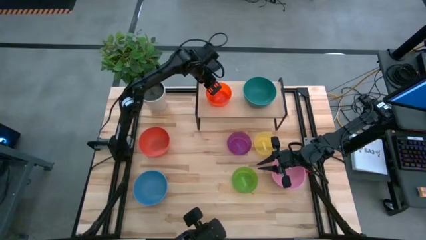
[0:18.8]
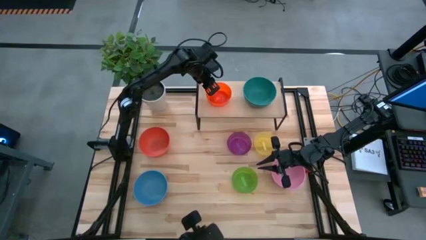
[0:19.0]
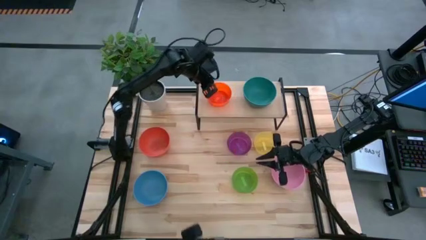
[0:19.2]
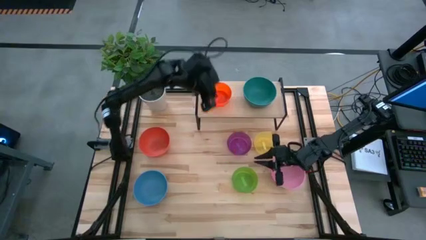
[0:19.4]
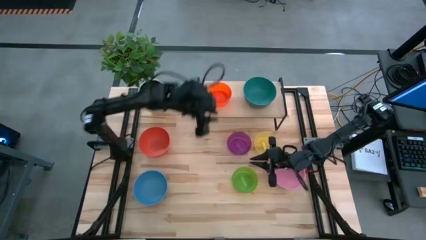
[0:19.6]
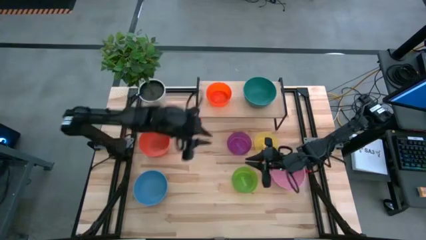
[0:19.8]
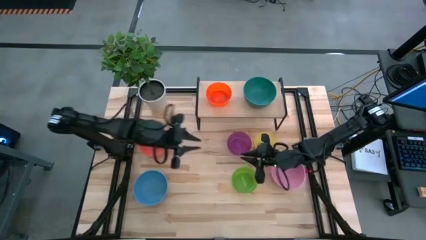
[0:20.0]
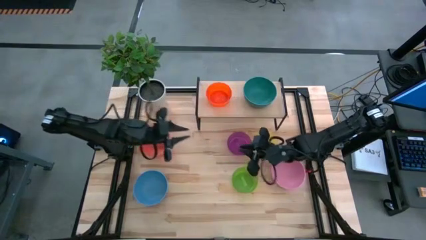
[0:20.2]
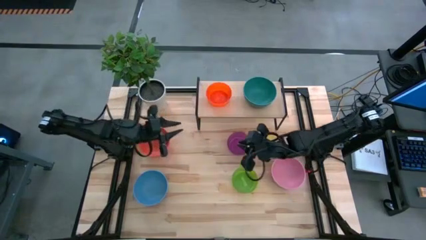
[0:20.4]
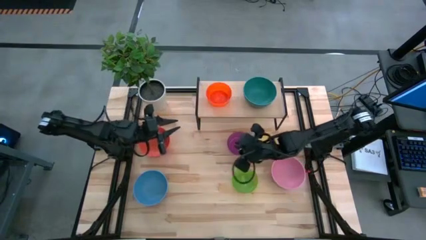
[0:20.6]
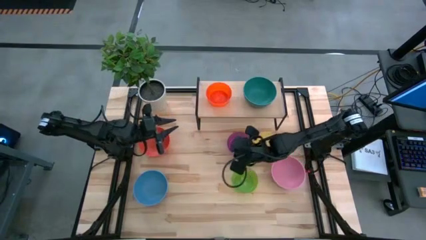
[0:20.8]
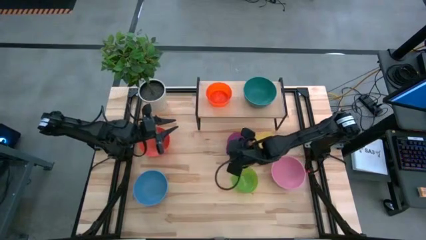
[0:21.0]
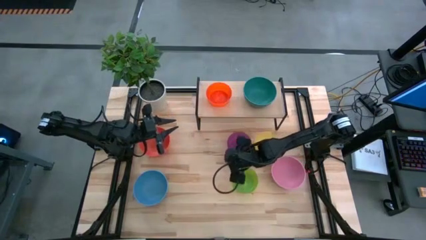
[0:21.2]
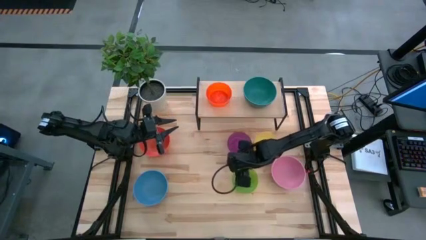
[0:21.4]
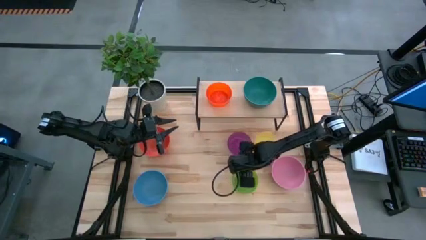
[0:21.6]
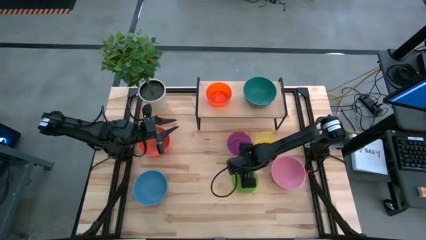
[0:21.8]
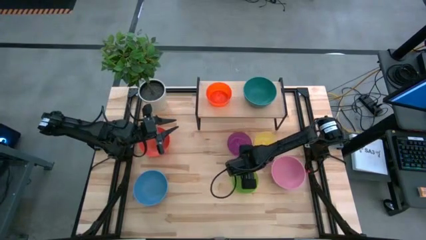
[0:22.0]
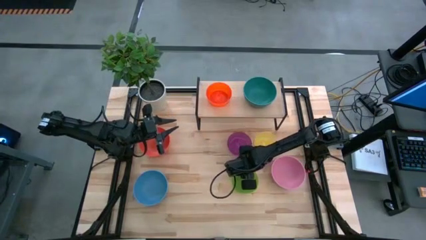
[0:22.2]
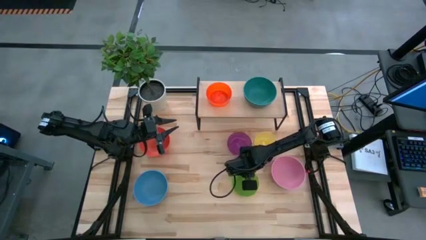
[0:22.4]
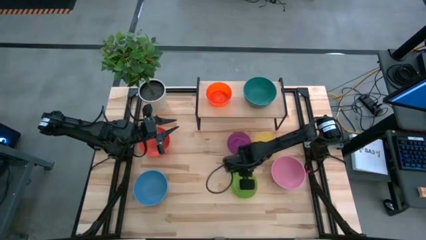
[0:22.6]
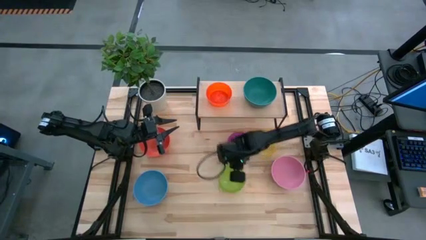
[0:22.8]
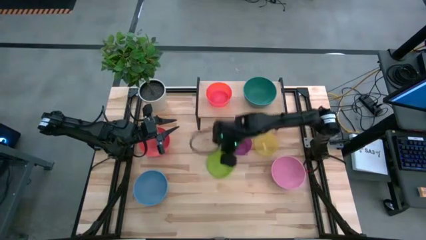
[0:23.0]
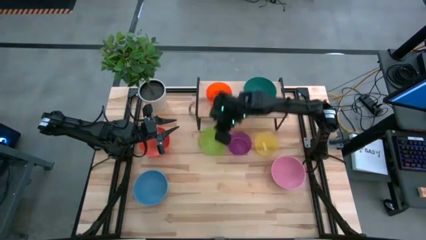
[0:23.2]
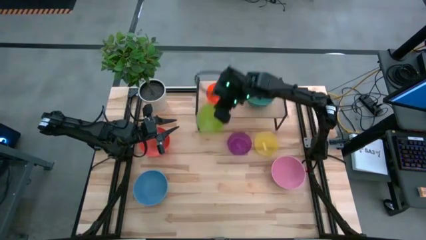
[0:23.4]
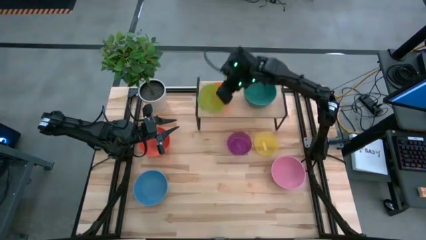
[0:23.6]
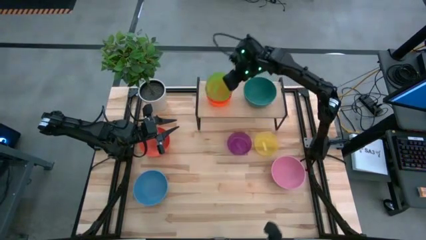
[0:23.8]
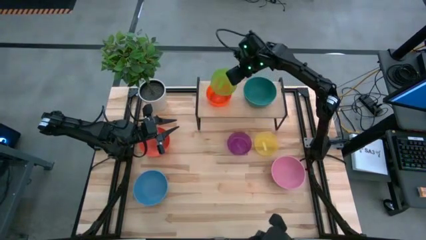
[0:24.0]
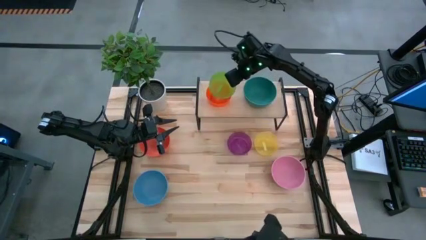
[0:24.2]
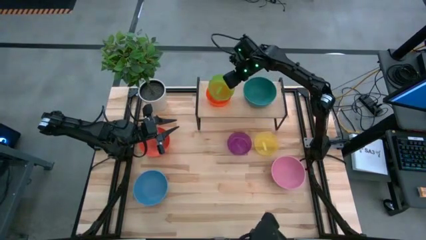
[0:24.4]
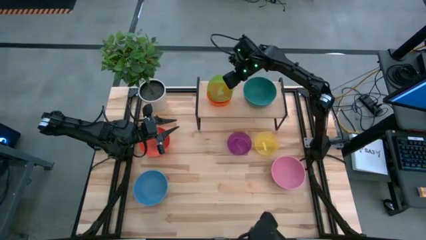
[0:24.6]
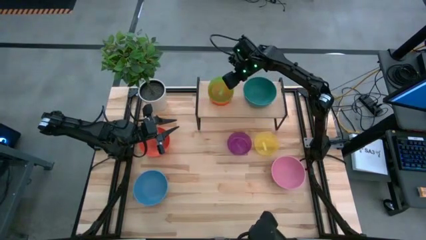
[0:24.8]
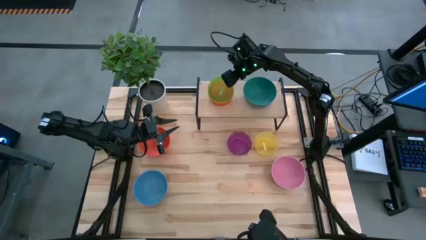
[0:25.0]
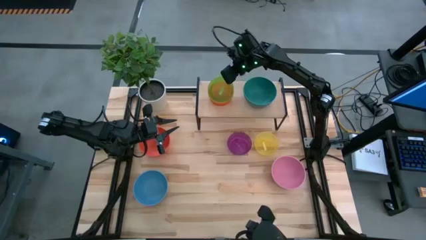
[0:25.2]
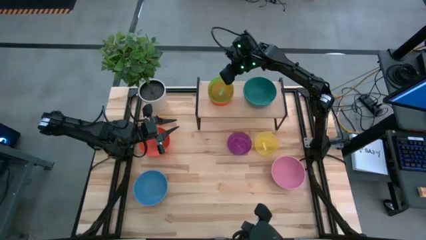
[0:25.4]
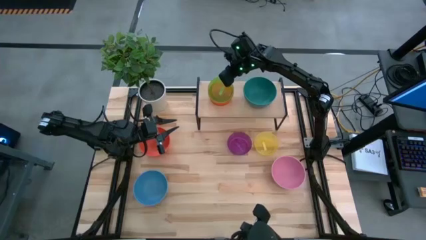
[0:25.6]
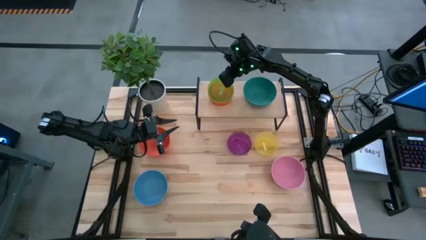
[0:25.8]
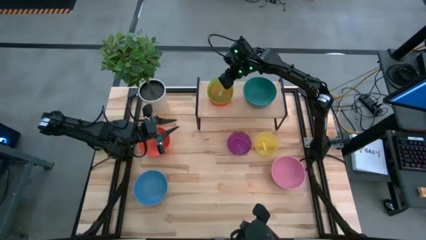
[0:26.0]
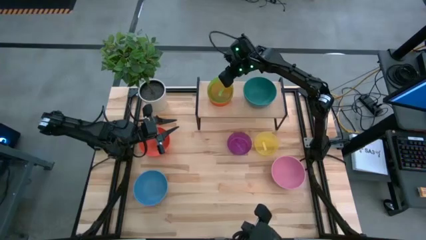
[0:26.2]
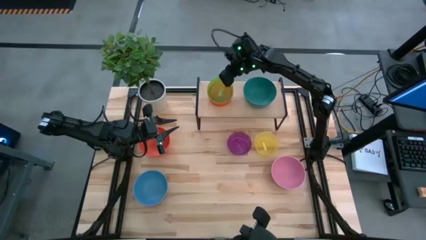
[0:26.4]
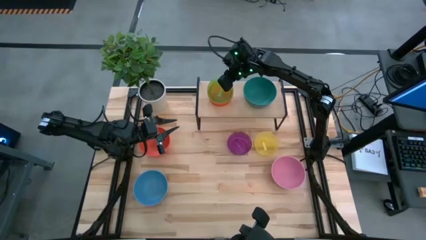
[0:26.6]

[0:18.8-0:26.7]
Task: Place and stack bowls onto a shelf
Stack the small green bowl on top of the small orange bowl on the shelf

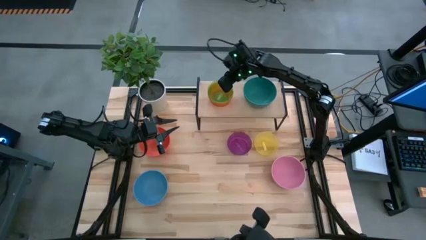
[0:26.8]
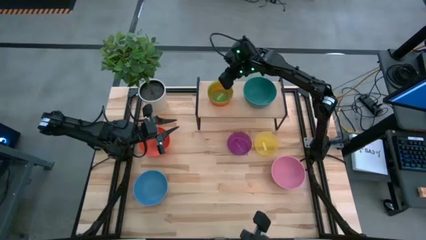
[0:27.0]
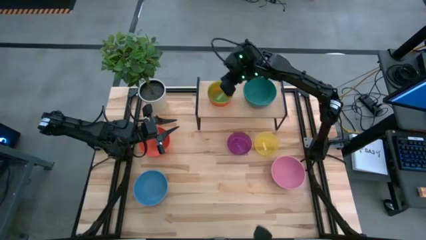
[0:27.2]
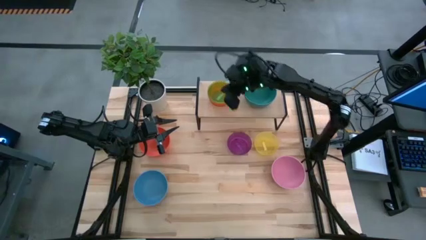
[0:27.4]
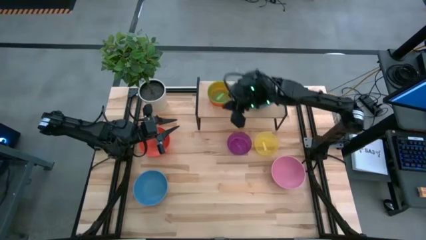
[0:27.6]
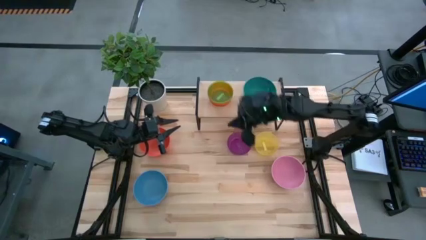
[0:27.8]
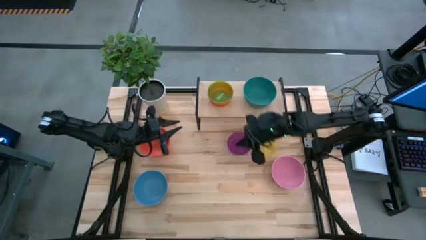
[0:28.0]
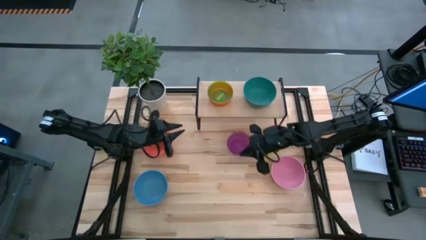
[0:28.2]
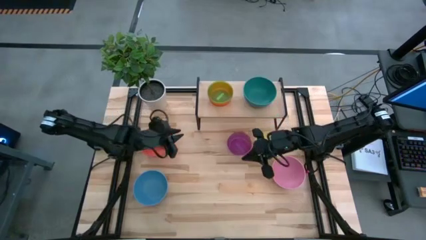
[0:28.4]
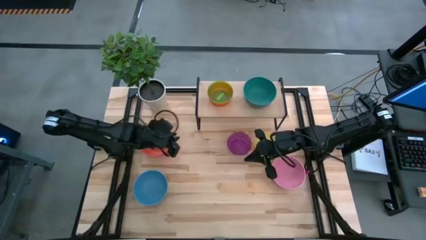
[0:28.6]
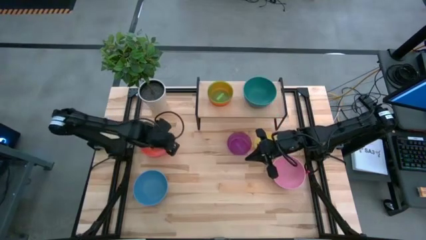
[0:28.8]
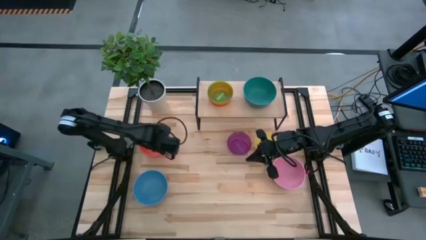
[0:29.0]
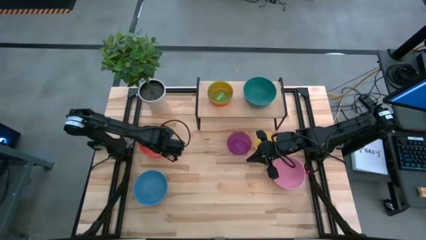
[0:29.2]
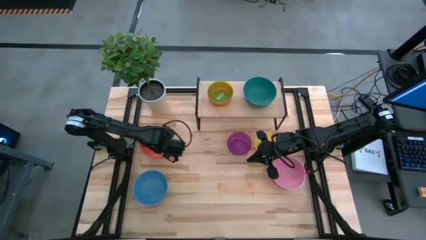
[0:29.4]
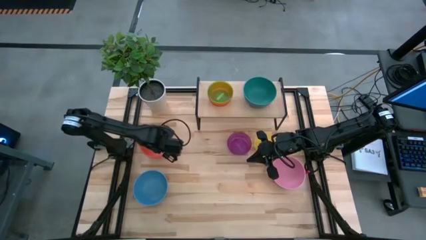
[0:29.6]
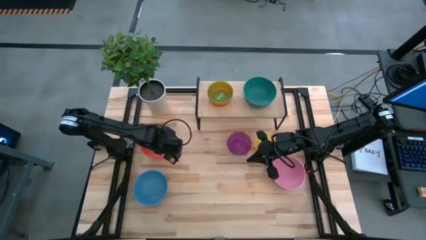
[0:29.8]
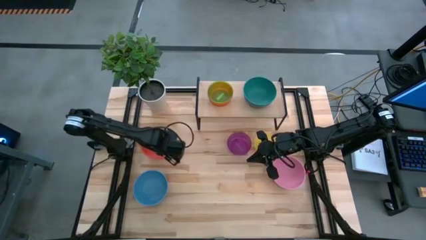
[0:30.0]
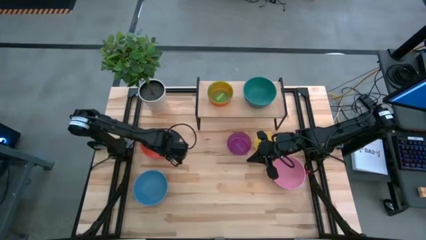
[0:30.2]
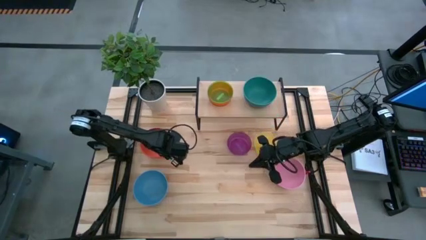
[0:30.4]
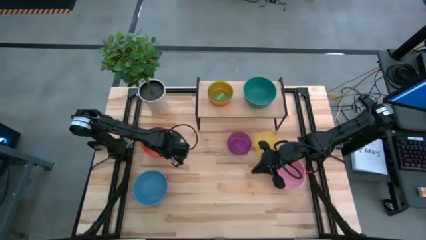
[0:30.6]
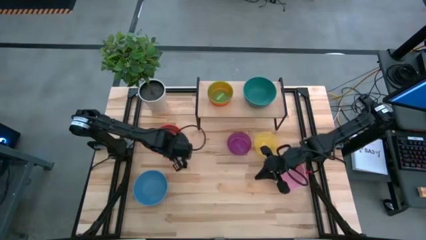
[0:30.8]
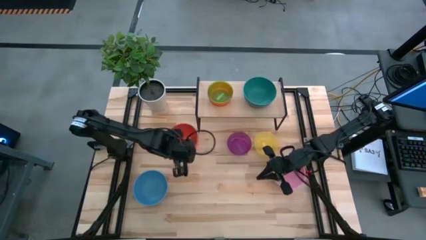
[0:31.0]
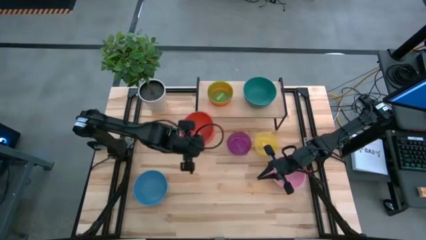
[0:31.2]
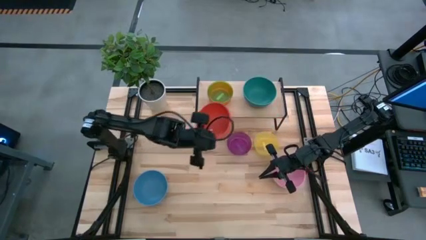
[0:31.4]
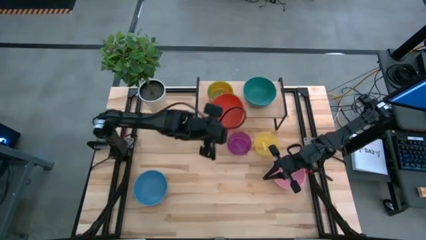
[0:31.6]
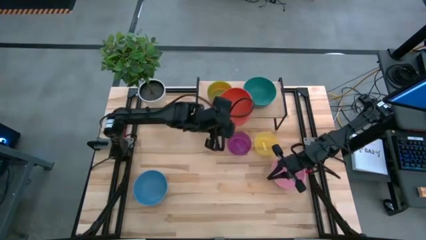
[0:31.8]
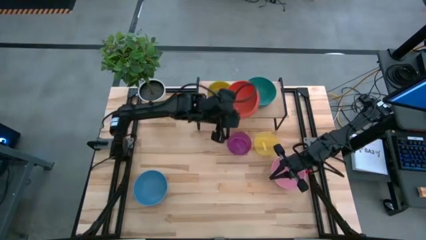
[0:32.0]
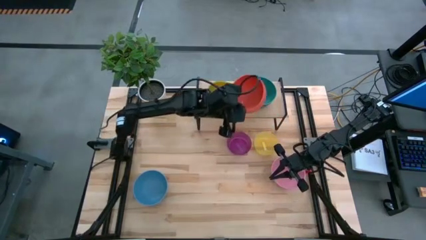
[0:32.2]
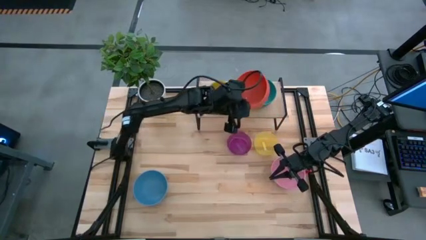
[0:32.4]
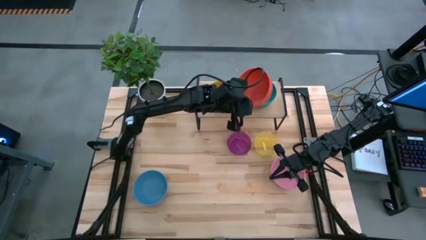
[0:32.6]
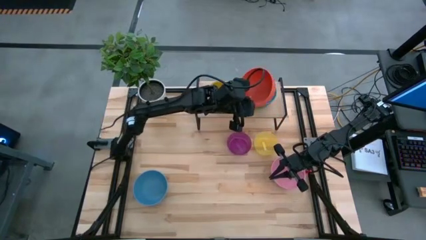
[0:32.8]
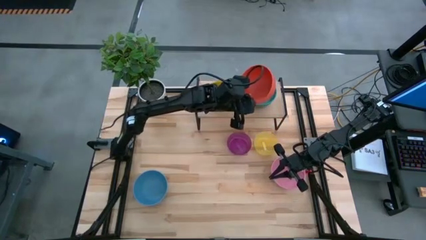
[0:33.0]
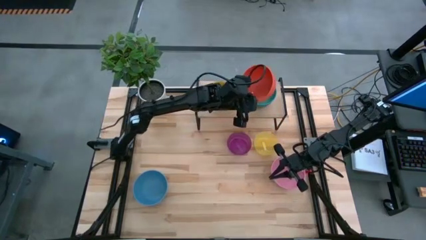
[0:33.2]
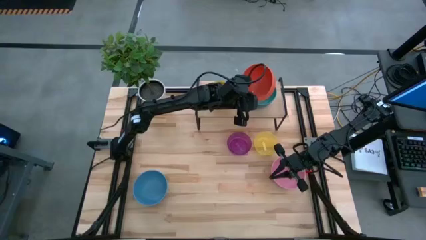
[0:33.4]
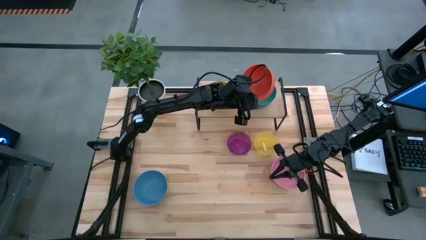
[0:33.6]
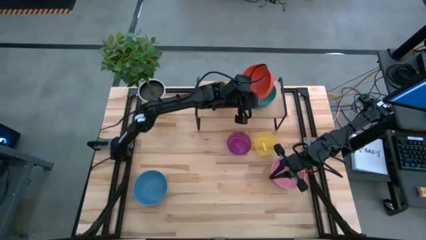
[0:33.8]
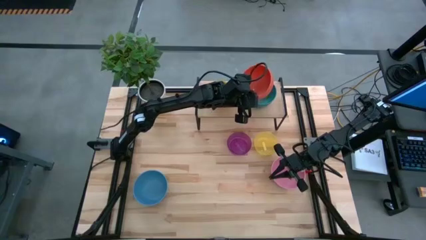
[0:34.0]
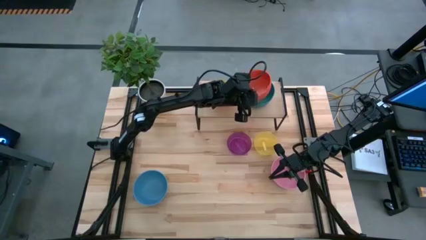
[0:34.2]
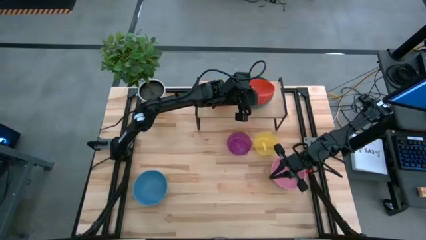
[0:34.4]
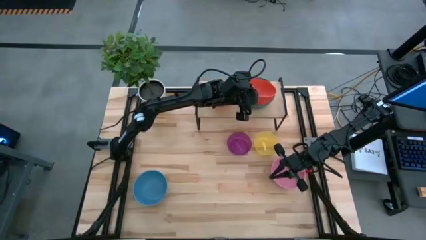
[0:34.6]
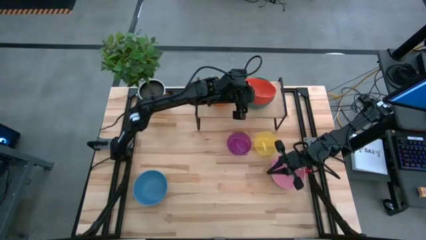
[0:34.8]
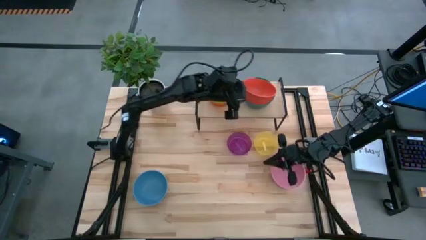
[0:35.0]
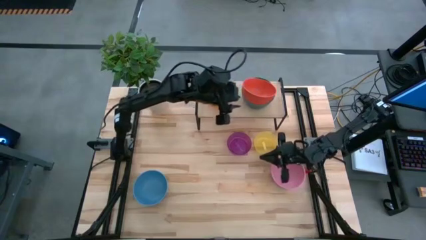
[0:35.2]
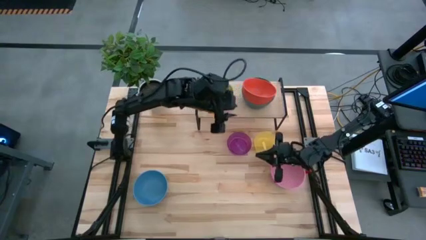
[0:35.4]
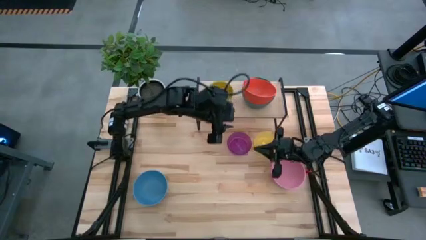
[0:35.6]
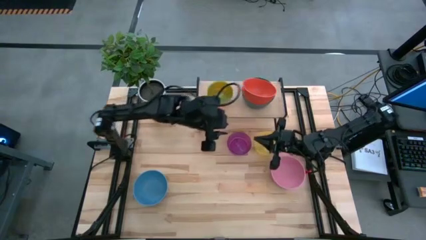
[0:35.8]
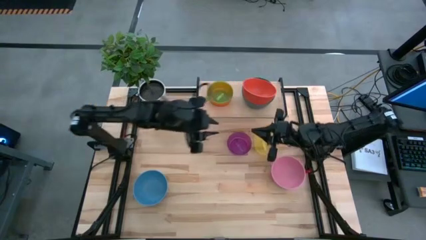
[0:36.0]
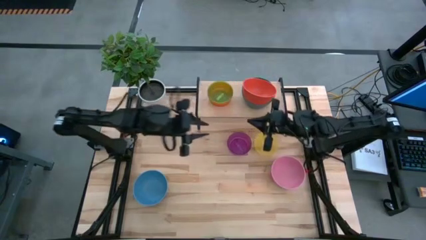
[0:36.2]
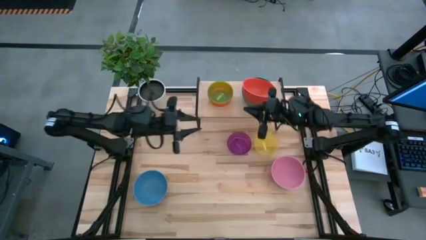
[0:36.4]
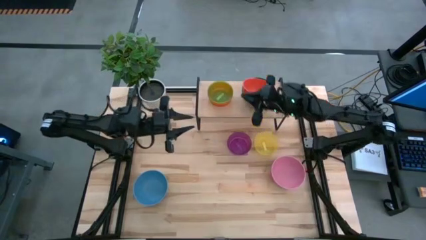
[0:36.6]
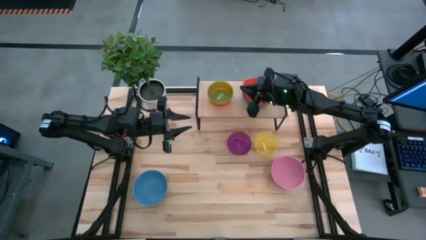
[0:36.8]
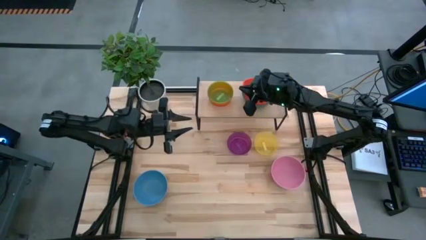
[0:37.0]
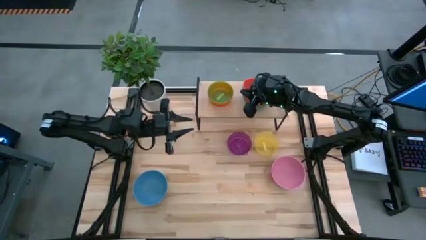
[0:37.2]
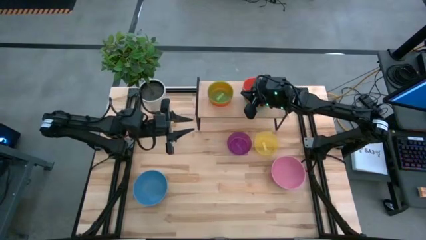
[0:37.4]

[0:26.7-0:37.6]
Stack the large orange bowl on top of the large dark green bowl on the shelf
